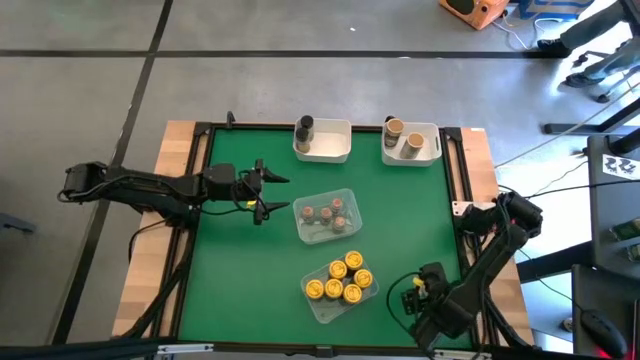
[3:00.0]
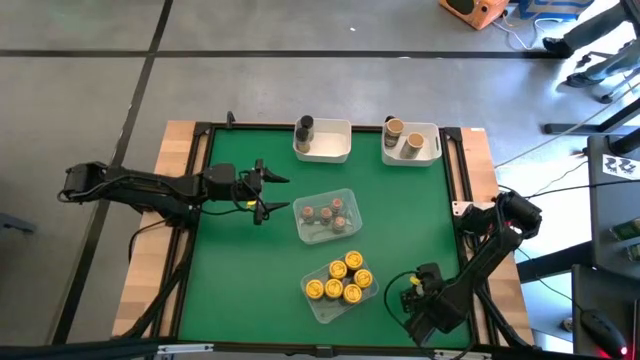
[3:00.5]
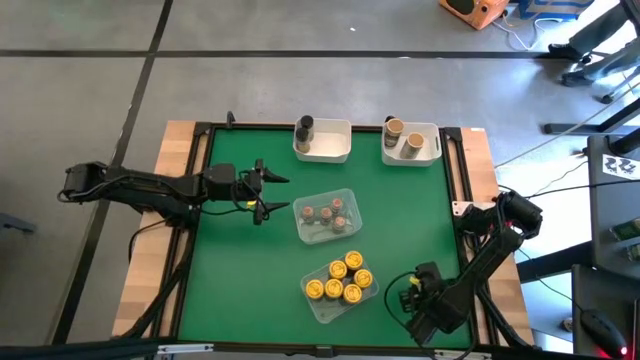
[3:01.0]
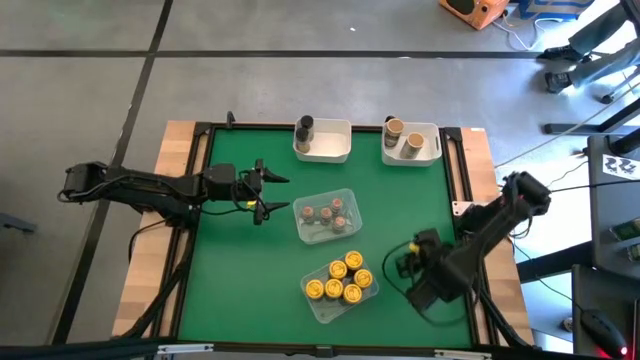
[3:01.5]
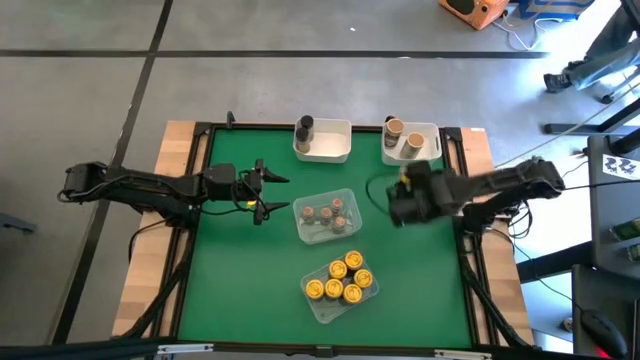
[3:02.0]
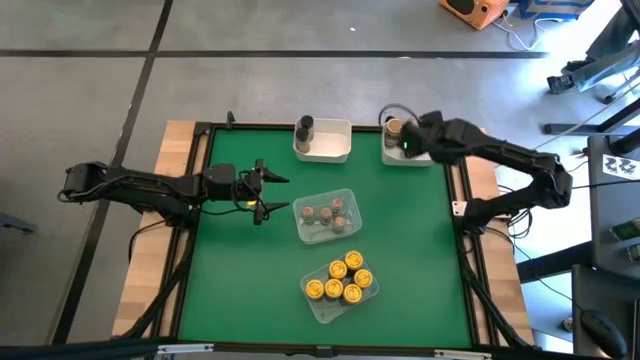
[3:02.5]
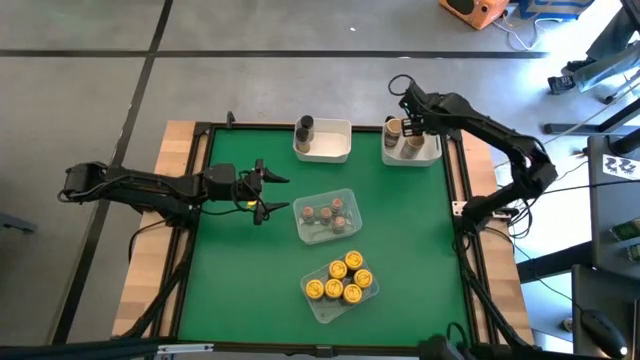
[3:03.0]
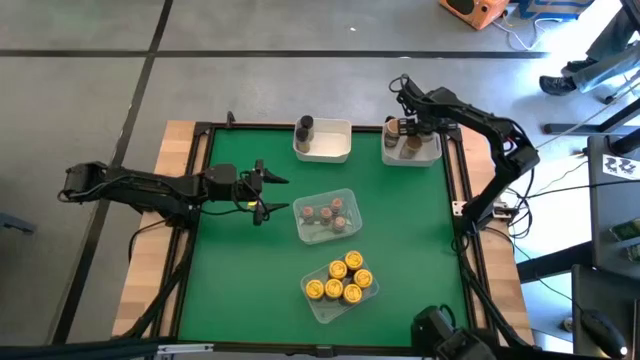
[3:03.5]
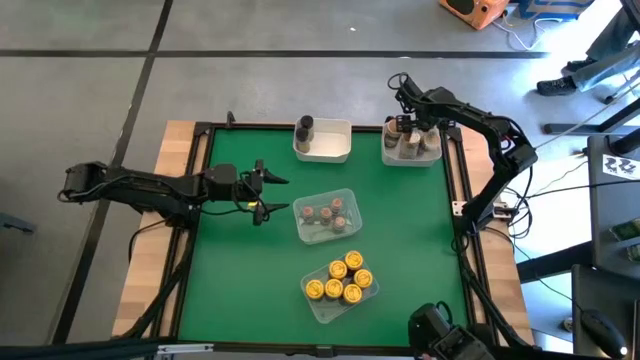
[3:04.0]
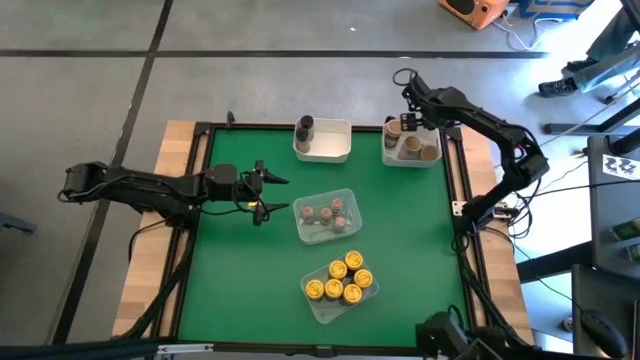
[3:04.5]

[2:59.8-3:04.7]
Task: Sort spices by type
Put the brown seasoning bottle into the top right white bin

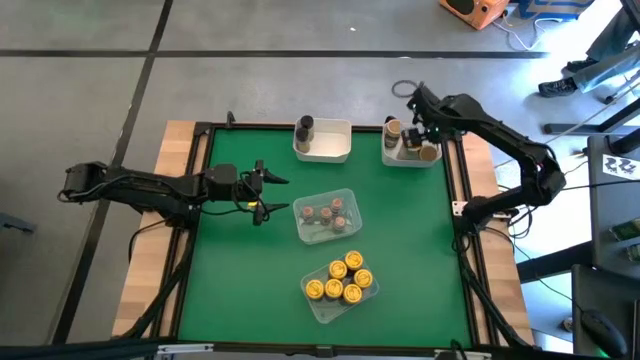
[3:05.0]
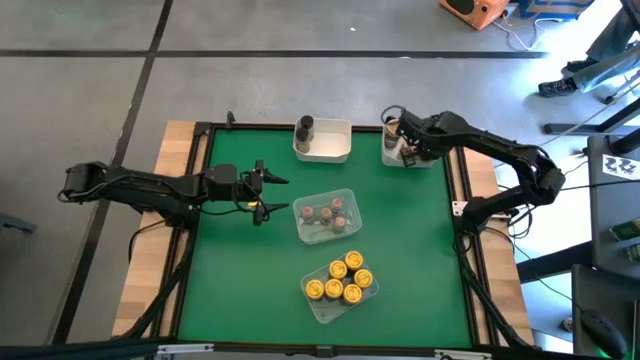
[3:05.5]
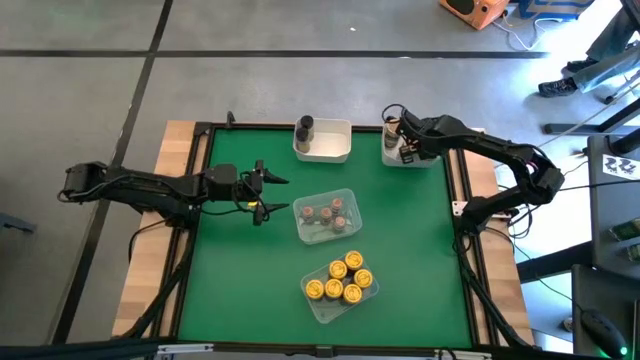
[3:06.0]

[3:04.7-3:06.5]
Adjust the brown seasoning bottle

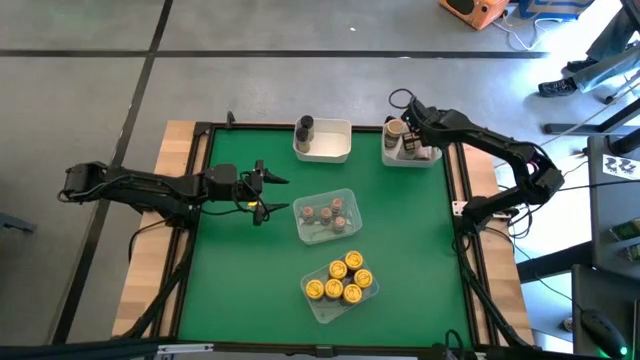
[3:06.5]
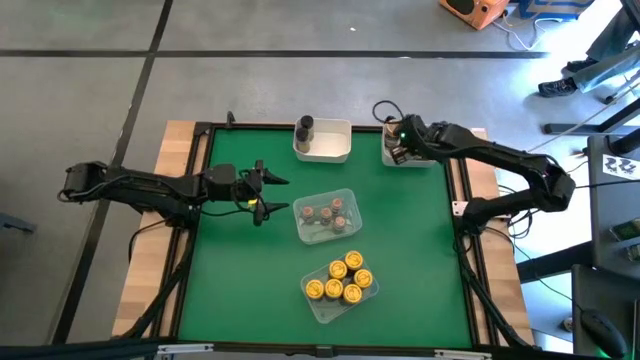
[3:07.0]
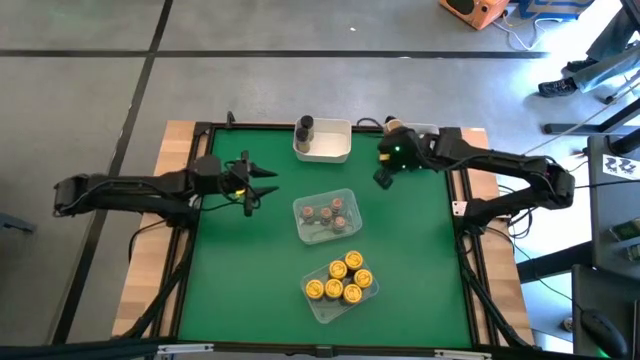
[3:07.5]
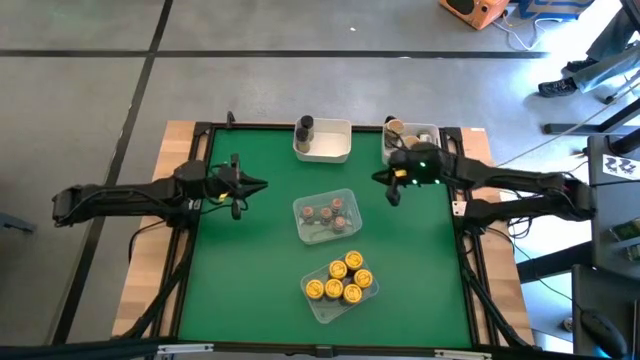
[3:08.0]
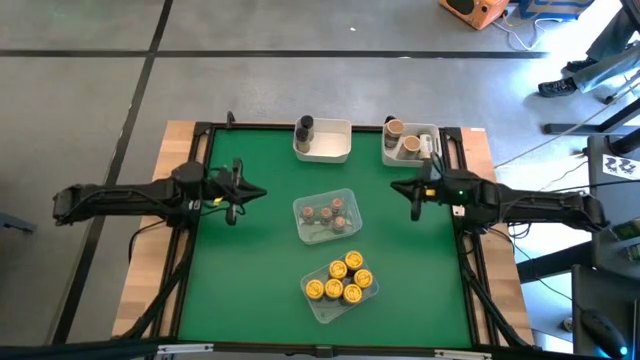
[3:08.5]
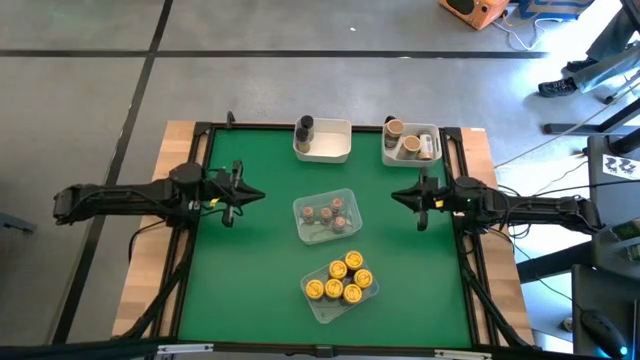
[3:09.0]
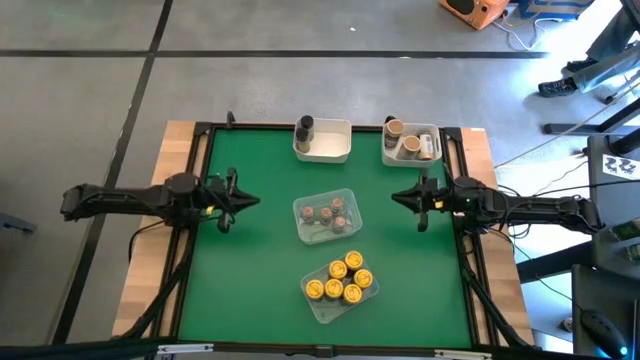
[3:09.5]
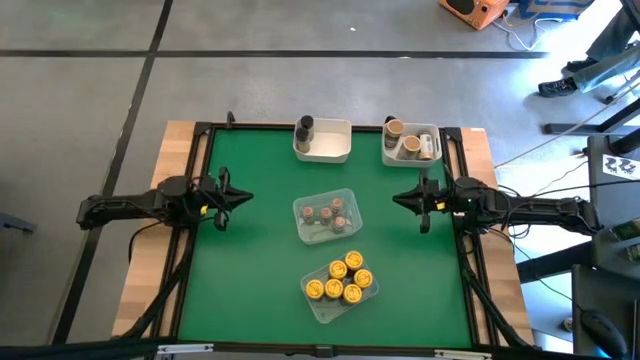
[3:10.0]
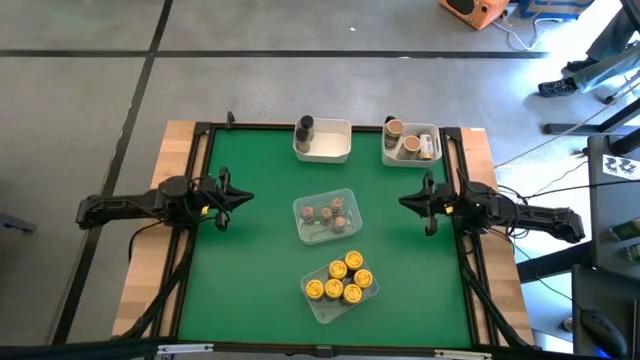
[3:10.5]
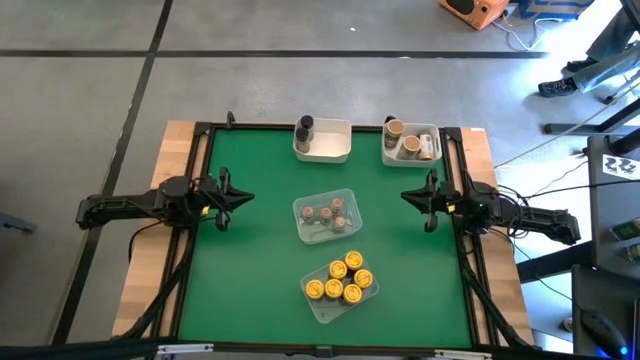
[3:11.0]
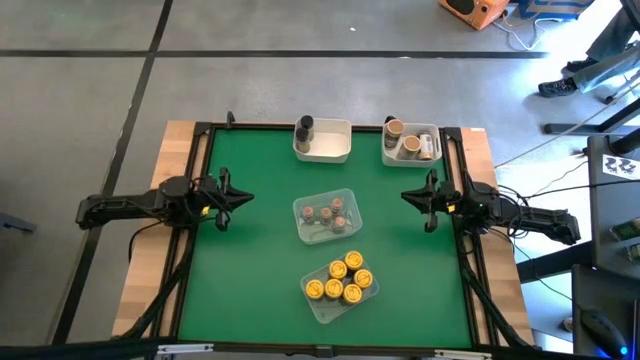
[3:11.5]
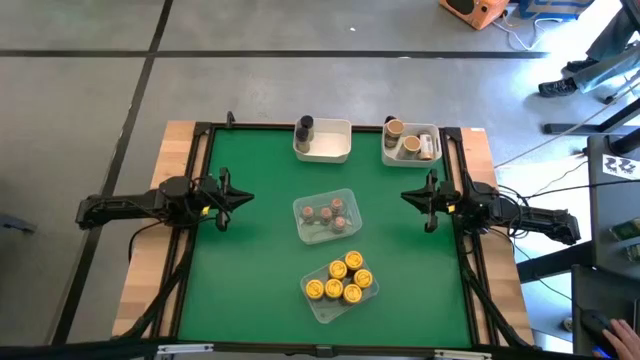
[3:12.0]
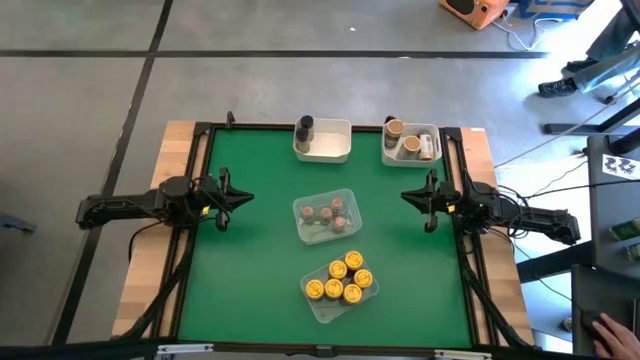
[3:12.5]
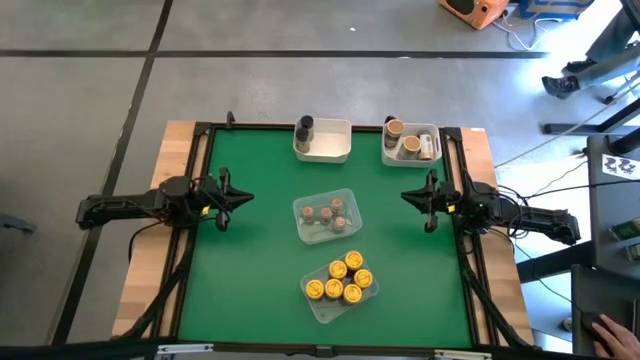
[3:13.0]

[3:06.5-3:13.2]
Return to Home Position

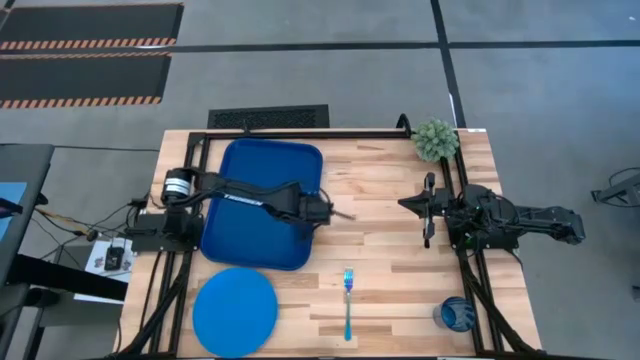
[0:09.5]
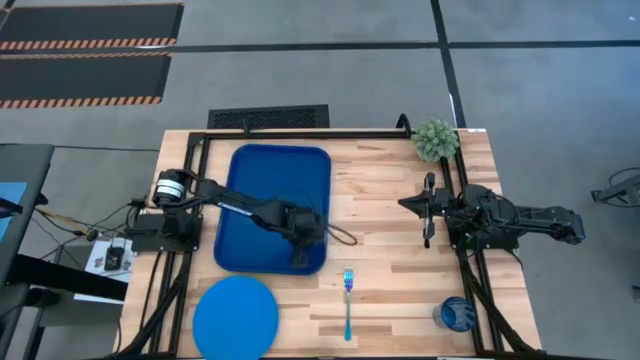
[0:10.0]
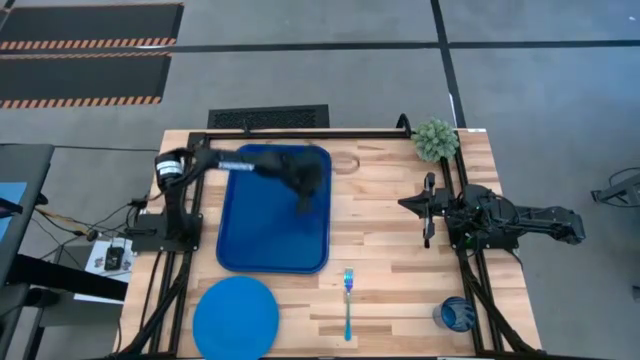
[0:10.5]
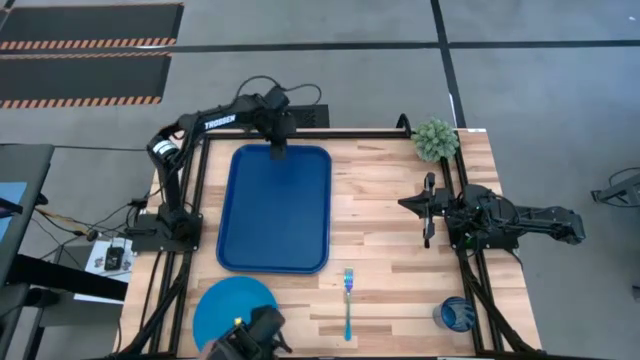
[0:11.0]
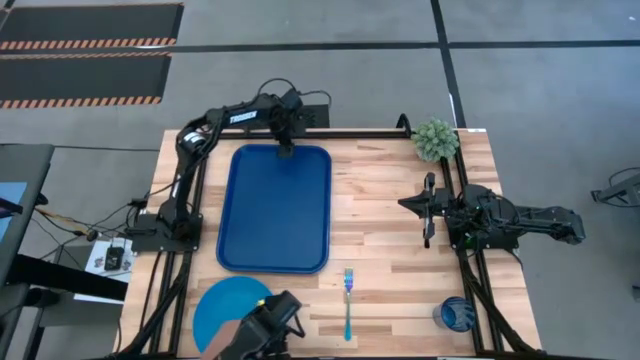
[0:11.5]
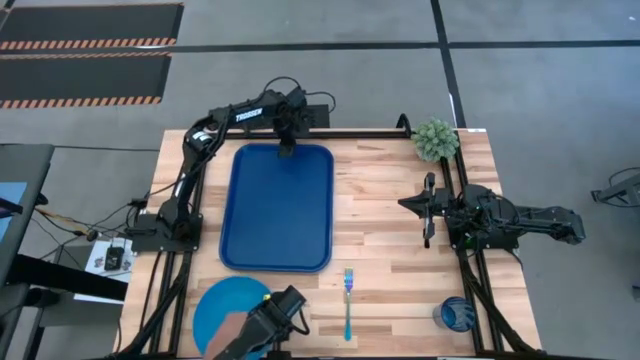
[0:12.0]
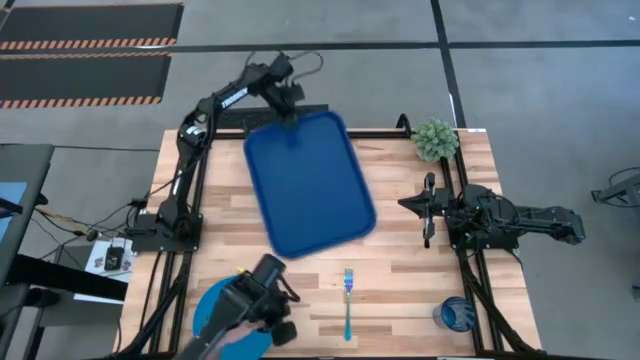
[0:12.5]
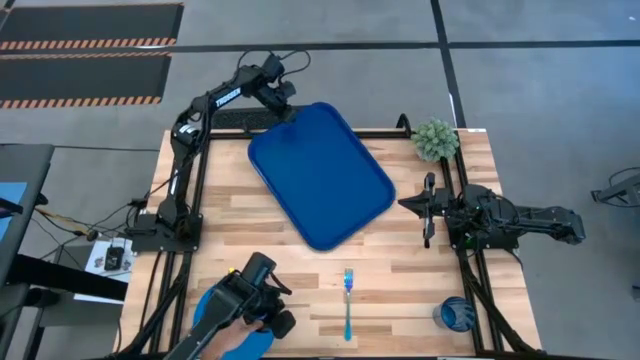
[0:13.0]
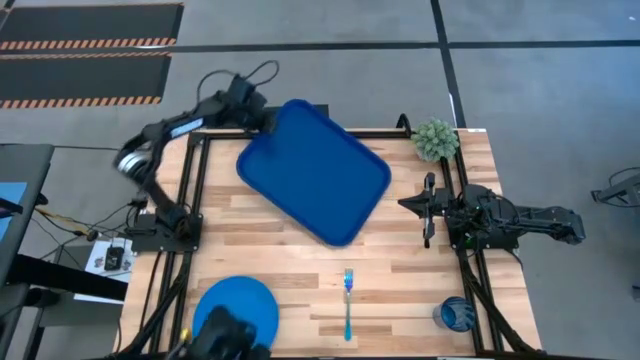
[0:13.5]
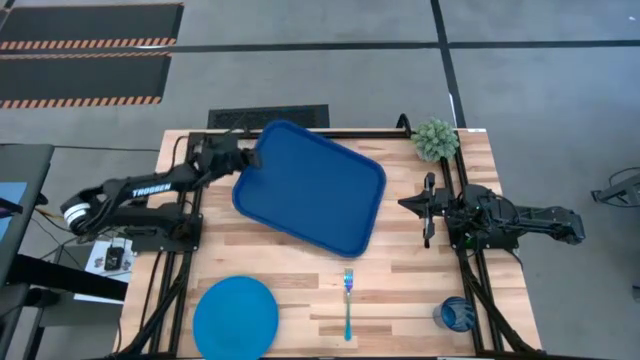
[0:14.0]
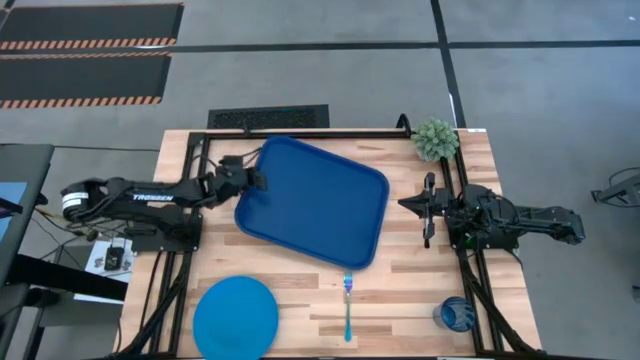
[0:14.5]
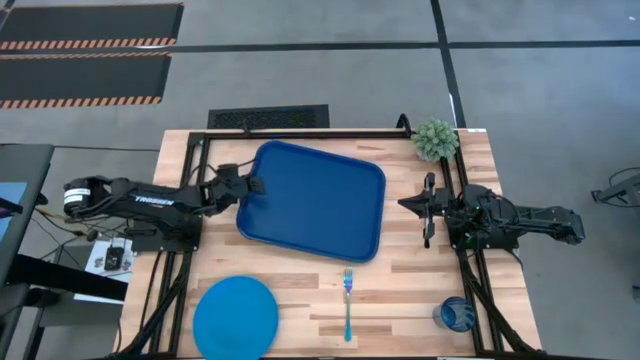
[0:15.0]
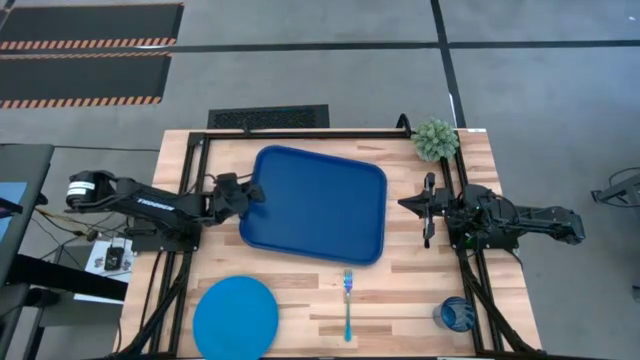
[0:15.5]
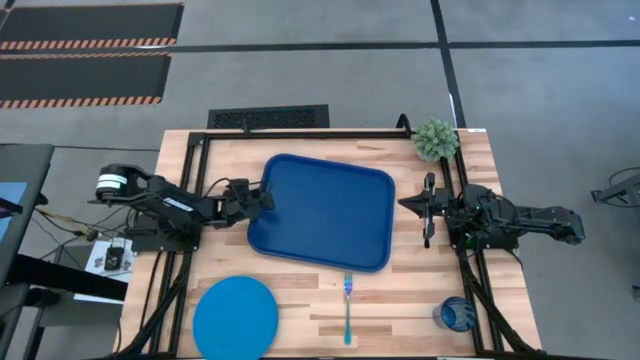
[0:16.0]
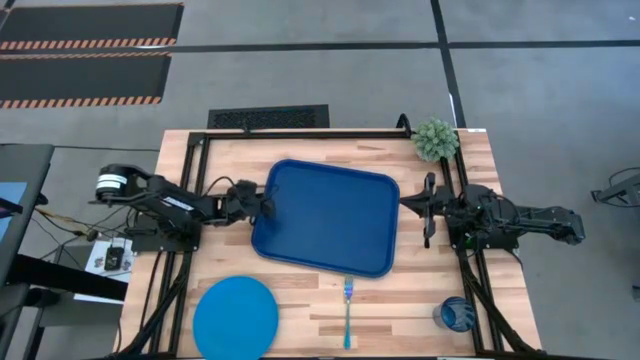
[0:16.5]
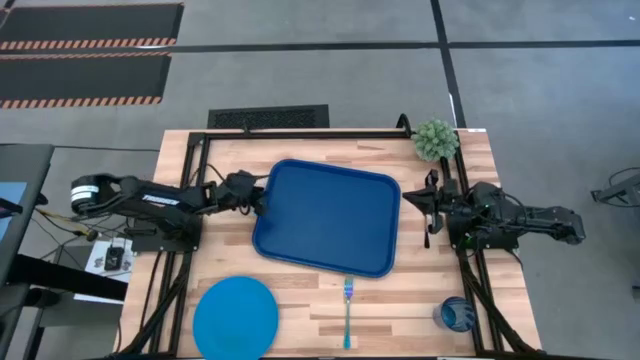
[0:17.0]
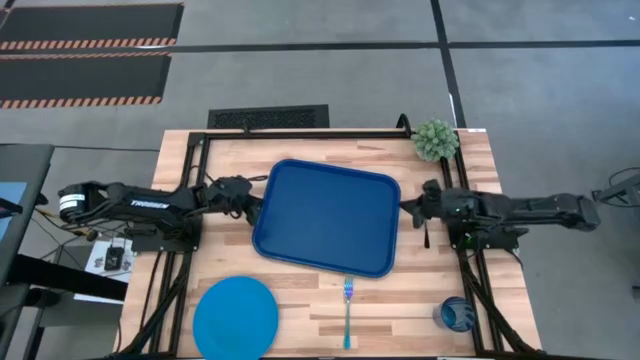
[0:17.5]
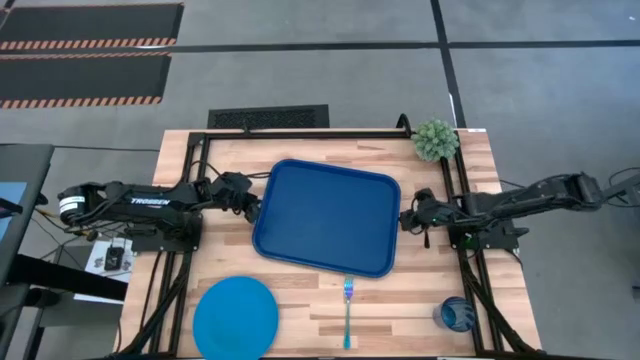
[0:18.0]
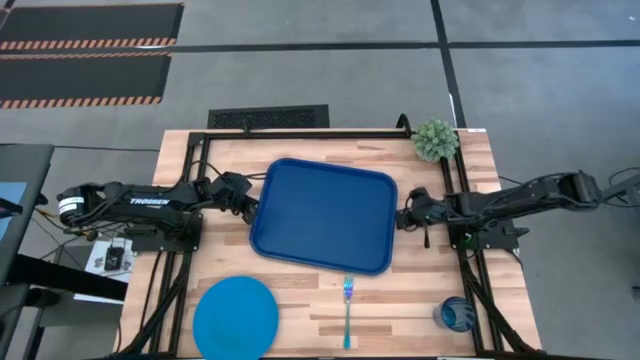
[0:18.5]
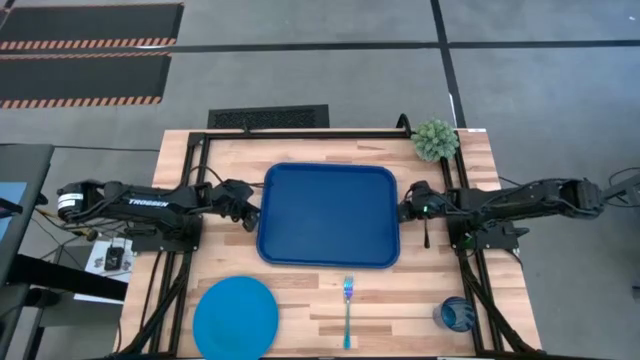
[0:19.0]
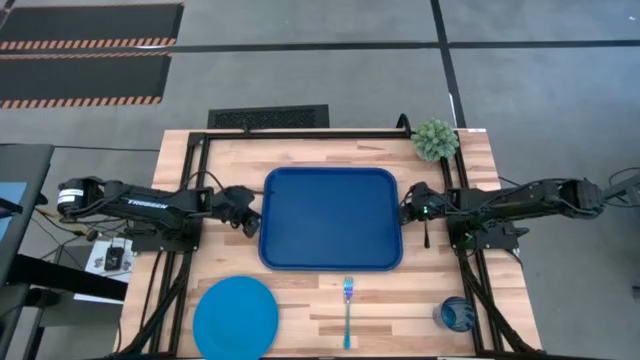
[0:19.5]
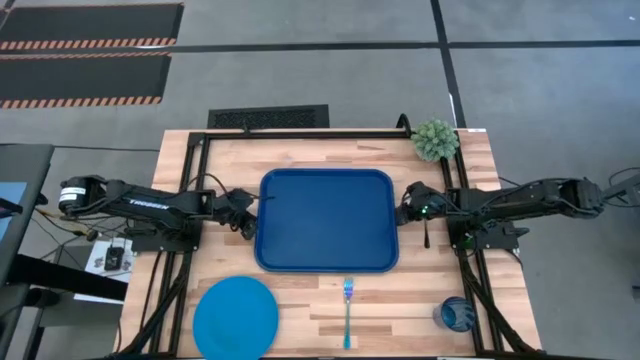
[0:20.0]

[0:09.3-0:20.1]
Task: Pick and place plate/cup/fork/spoon on tray
Move the blue serving tray to the center of the table
